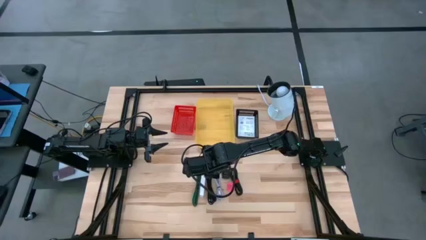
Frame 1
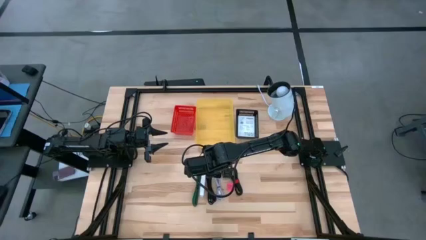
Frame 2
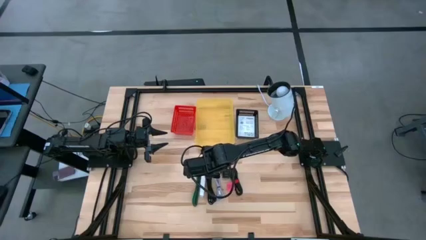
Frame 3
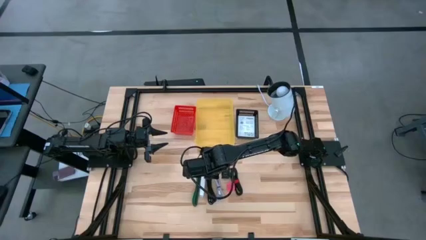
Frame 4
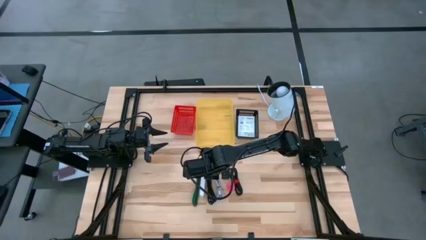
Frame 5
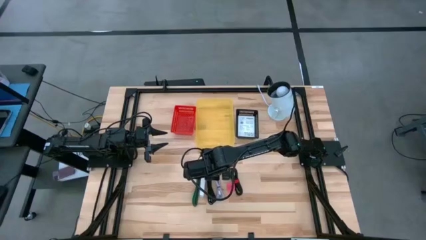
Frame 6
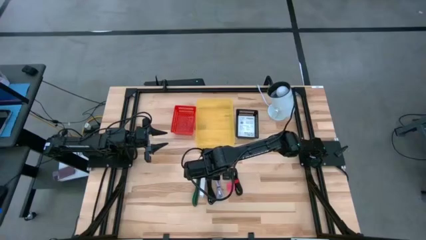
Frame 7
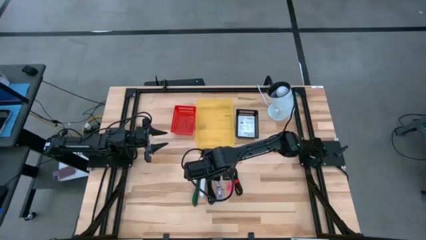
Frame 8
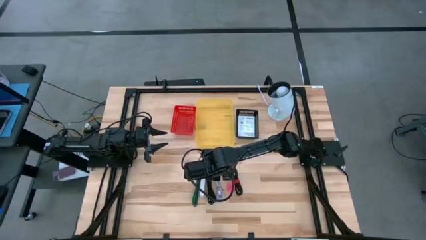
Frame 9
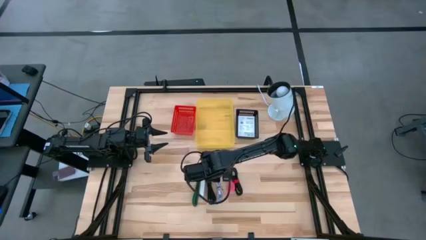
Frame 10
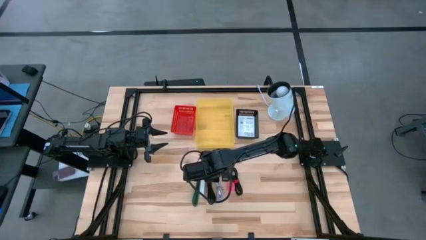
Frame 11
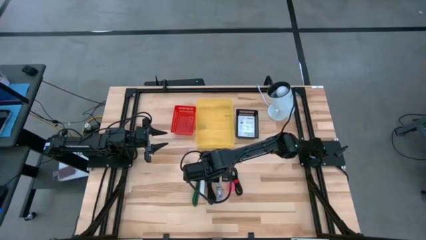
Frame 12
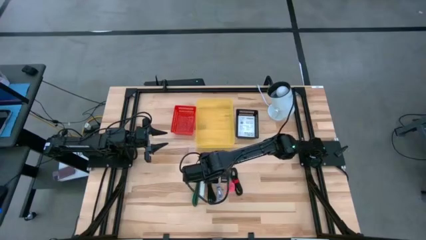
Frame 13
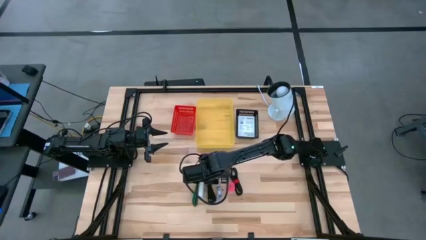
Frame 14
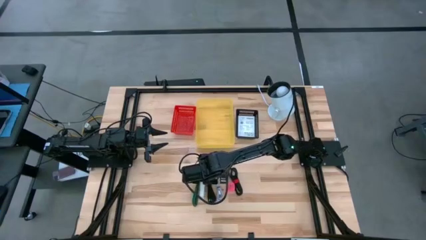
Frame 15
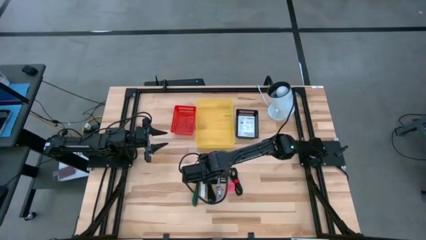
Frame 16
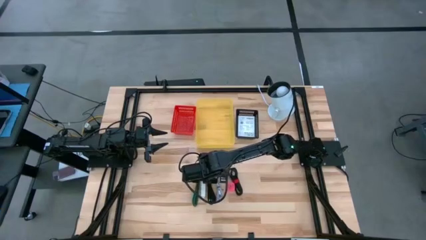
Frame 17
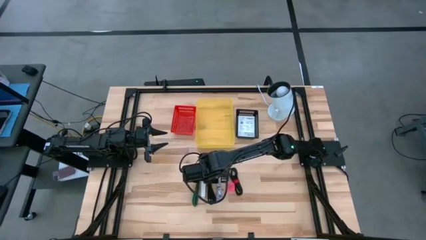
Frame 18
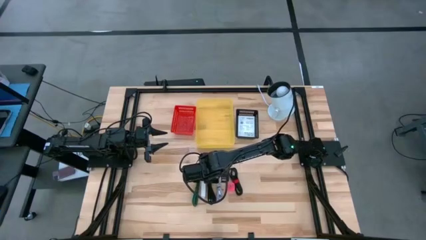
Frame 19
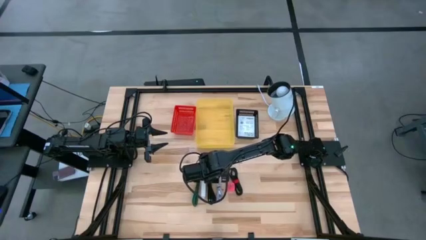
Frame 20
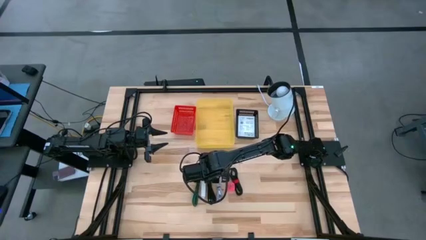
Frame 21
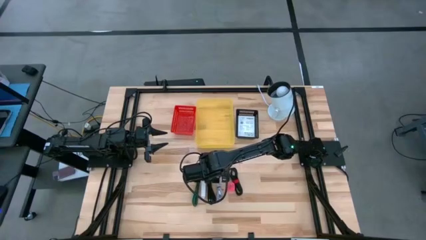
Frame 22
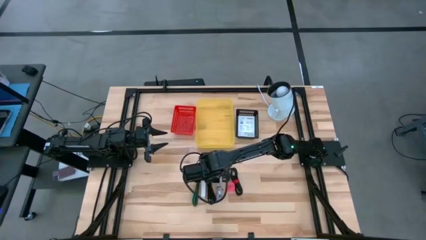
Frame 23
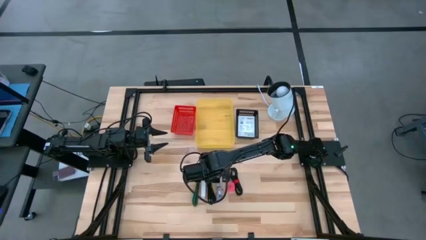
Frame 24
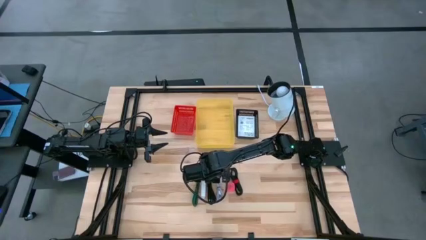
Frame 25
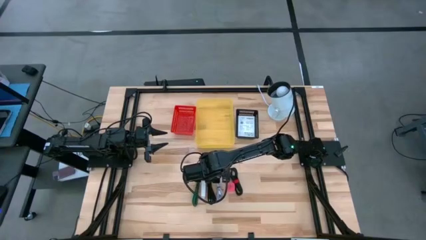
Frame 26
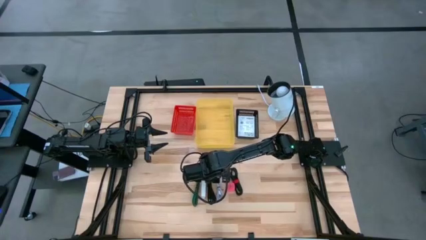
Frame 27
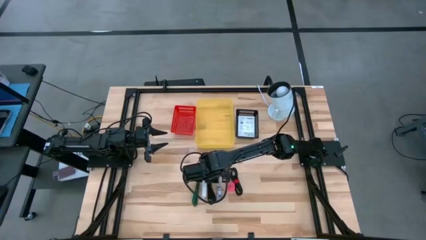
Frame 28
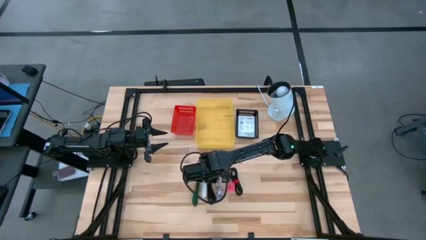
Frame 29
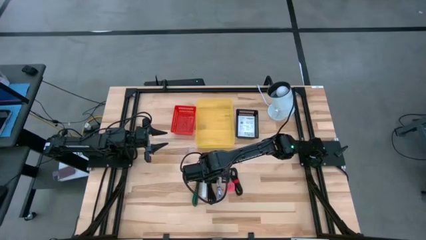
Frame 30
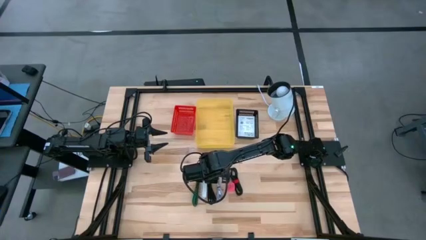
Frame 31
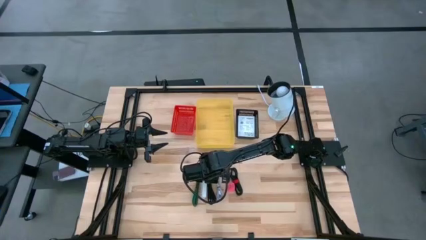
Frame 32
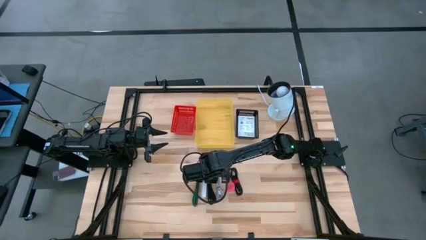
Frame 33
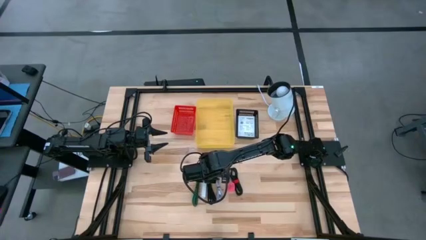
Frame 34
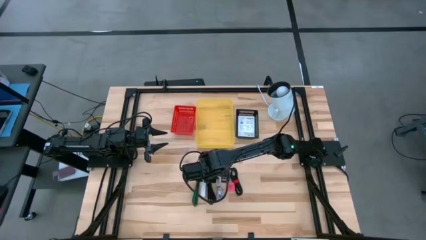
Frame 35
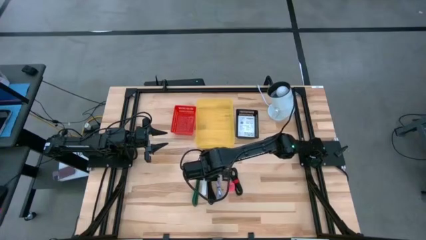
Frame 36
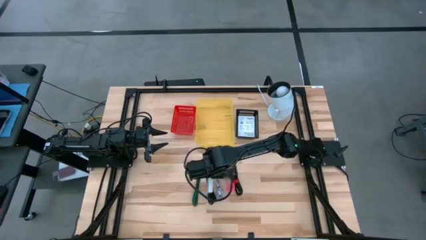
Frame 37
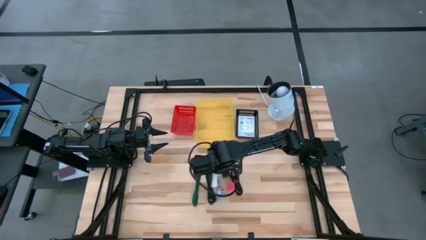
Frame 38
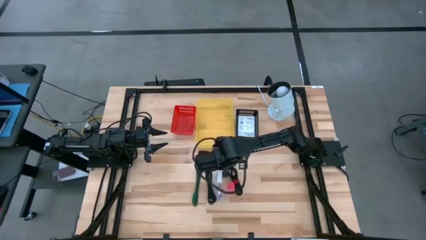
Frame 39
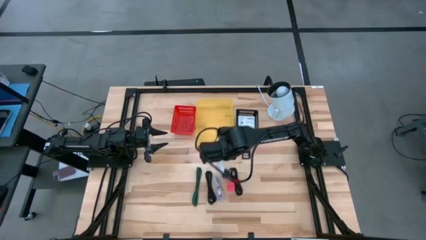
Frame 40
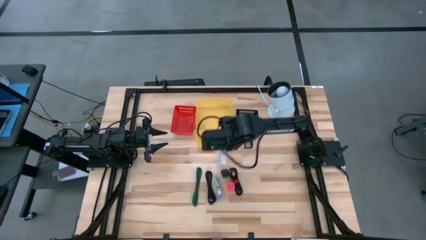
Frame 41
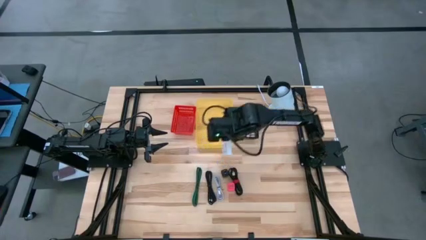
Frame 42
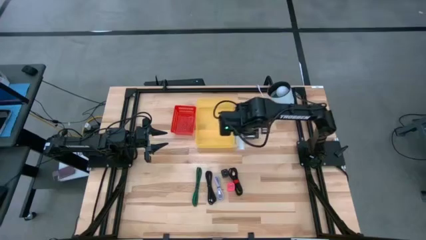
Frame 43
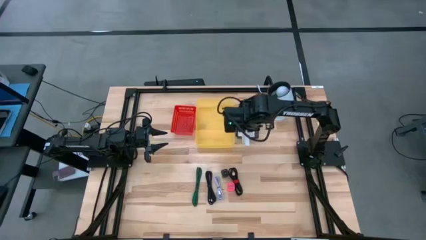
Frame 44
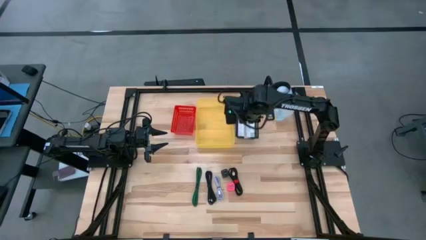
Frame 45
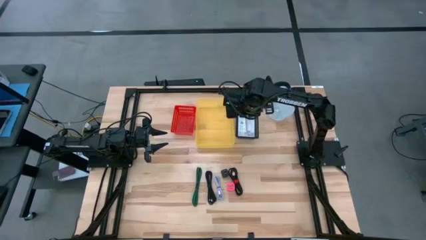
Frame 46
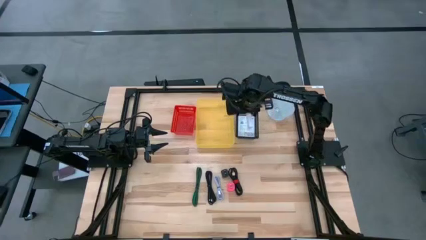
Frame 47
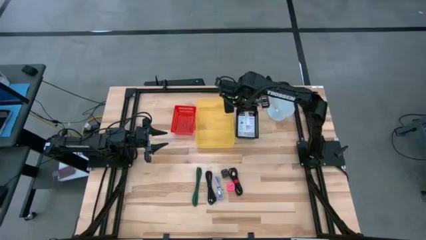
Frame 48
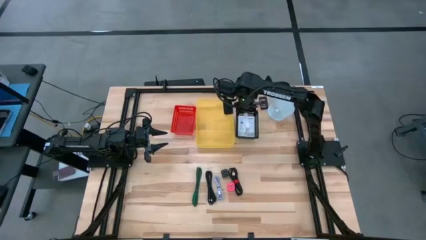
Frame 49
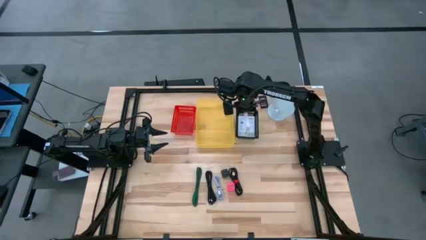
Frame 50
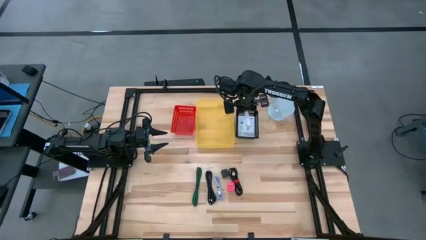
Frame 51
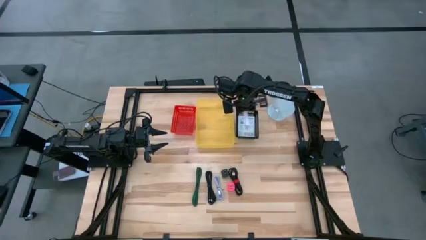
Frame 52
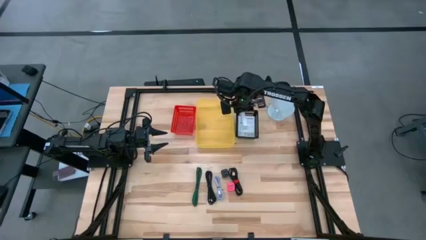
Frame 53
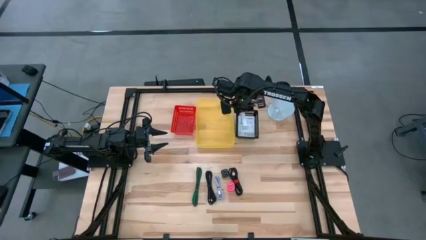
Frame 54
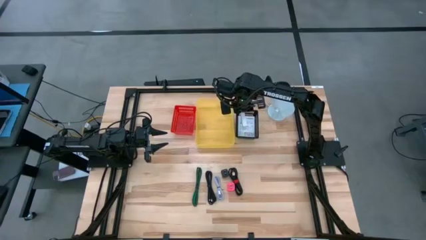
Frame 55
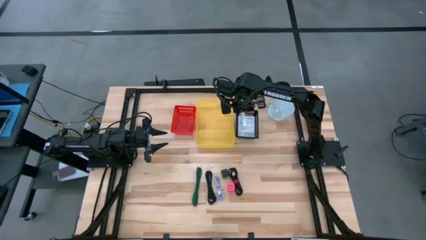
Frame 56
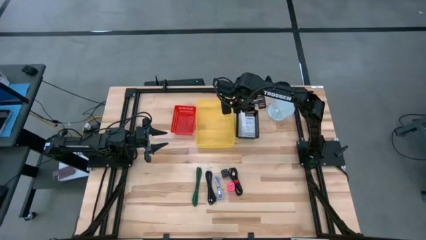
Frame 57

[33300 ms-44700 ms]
Task: Pick and place items into bin
Put the white card reader box into the black bin
